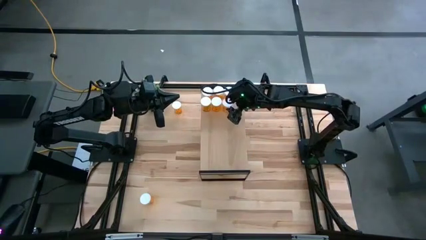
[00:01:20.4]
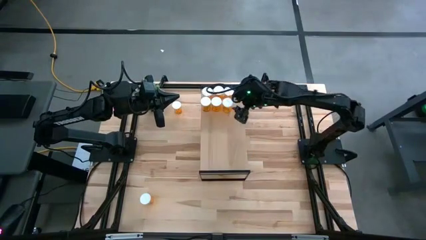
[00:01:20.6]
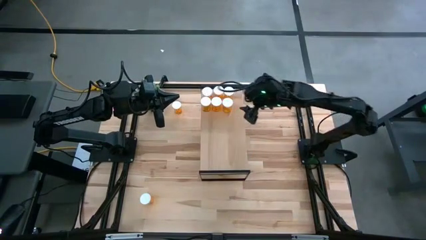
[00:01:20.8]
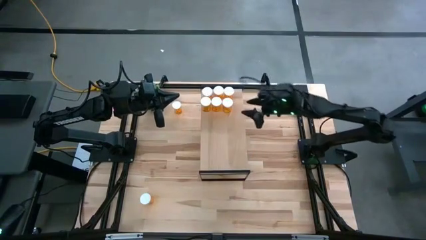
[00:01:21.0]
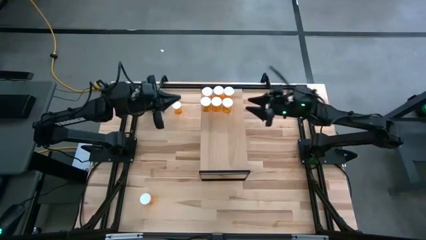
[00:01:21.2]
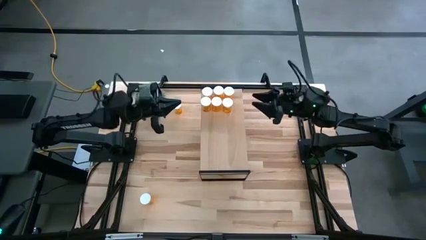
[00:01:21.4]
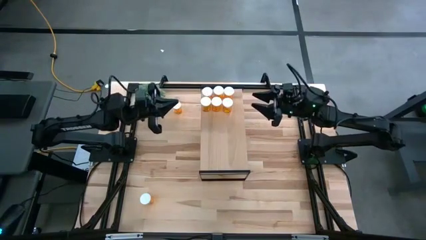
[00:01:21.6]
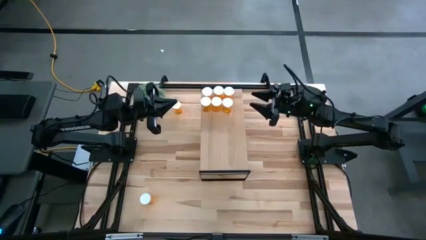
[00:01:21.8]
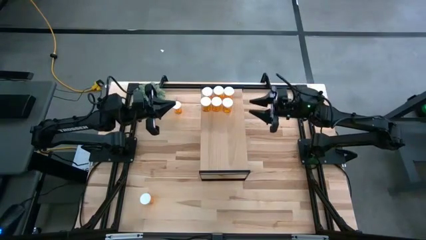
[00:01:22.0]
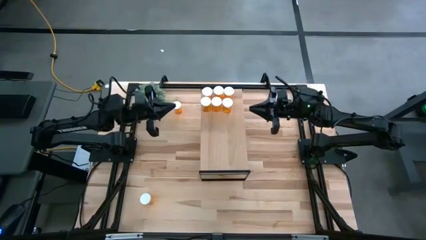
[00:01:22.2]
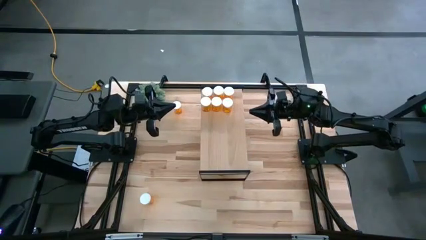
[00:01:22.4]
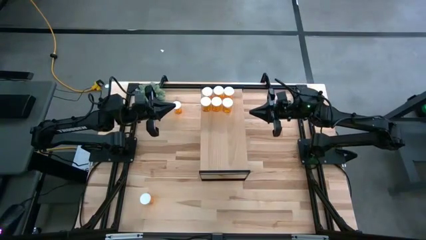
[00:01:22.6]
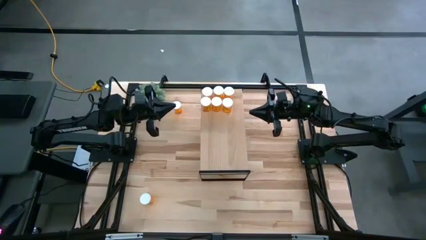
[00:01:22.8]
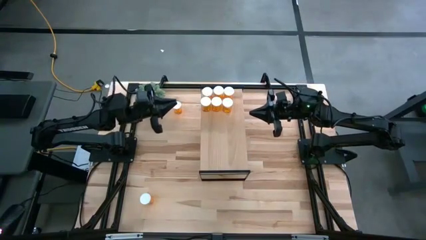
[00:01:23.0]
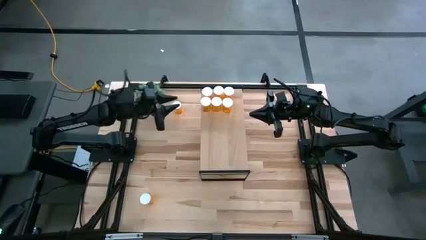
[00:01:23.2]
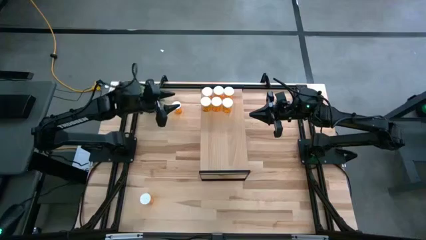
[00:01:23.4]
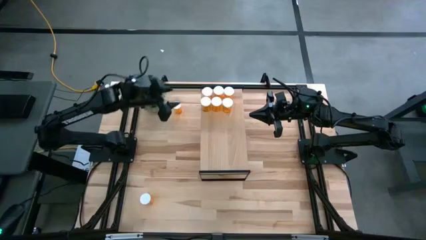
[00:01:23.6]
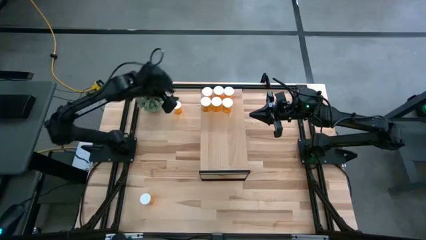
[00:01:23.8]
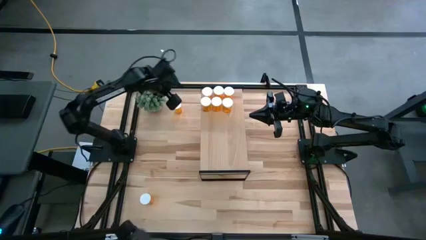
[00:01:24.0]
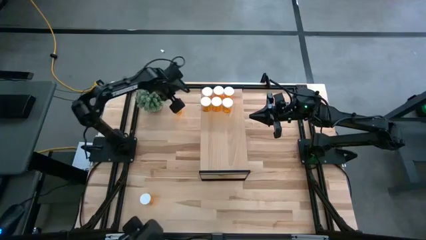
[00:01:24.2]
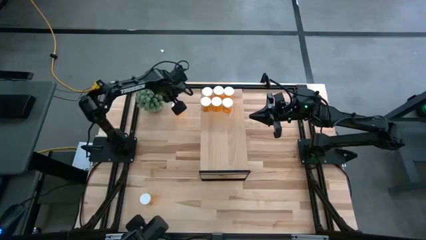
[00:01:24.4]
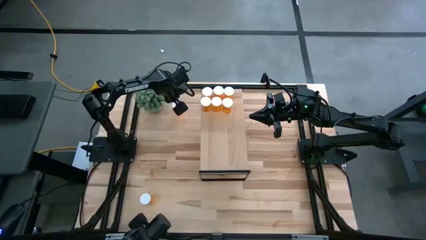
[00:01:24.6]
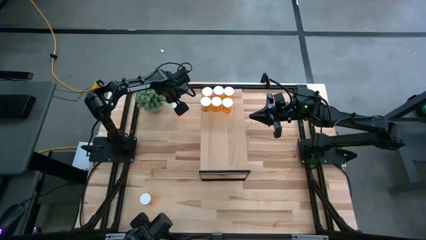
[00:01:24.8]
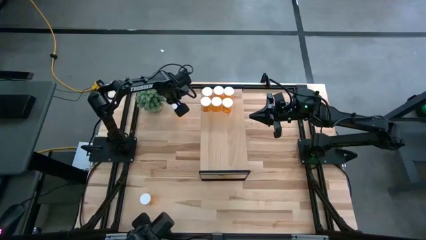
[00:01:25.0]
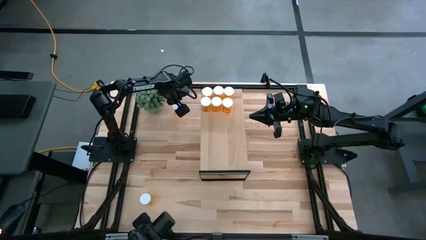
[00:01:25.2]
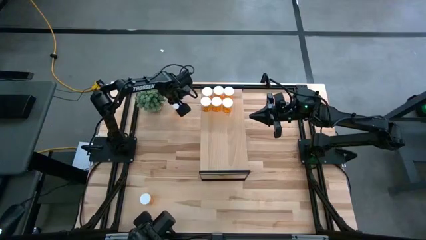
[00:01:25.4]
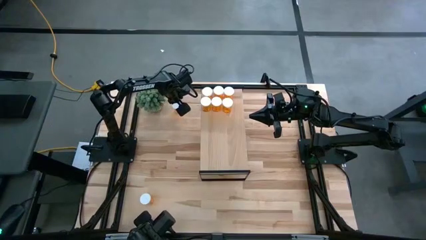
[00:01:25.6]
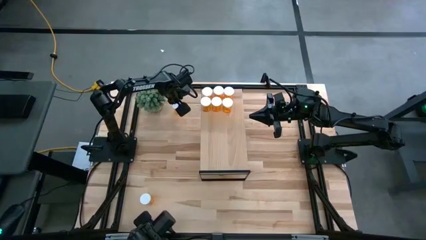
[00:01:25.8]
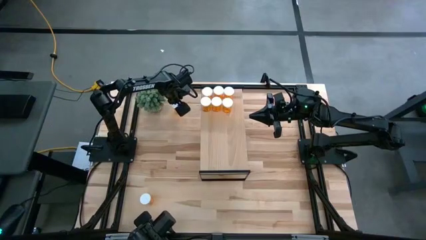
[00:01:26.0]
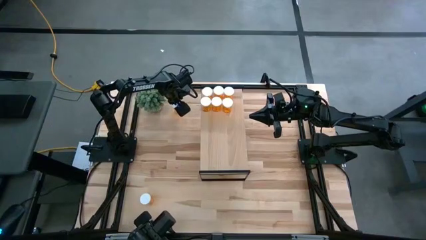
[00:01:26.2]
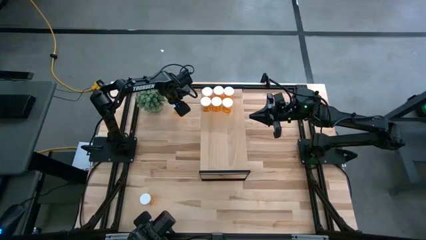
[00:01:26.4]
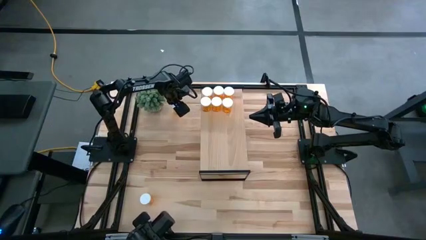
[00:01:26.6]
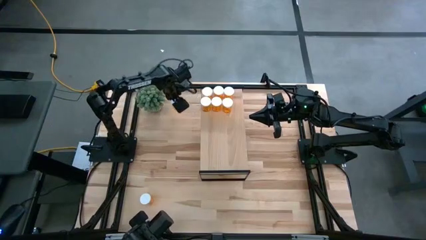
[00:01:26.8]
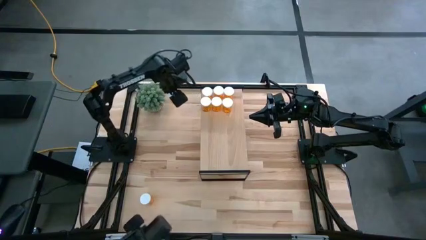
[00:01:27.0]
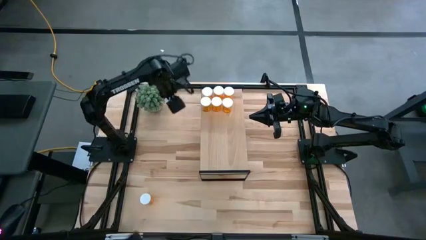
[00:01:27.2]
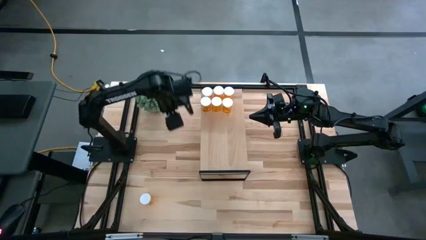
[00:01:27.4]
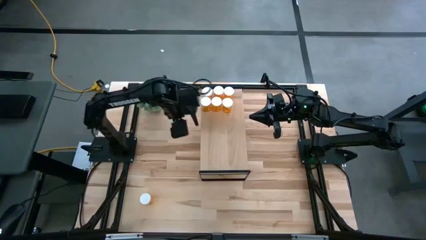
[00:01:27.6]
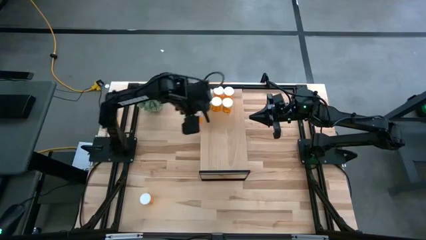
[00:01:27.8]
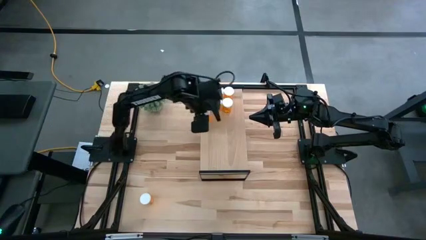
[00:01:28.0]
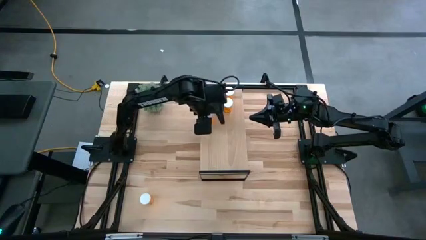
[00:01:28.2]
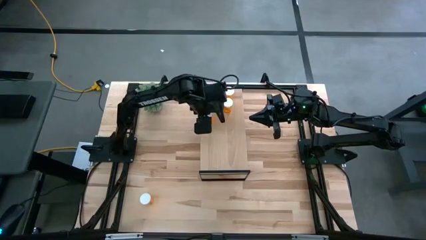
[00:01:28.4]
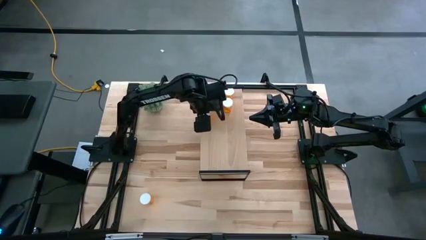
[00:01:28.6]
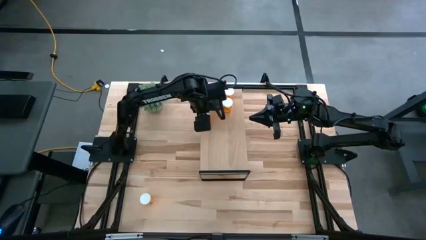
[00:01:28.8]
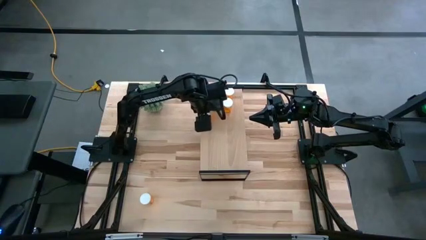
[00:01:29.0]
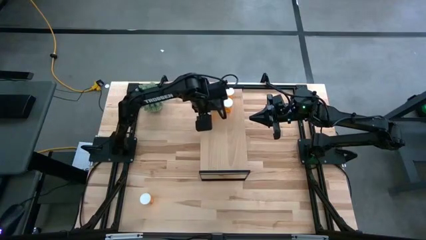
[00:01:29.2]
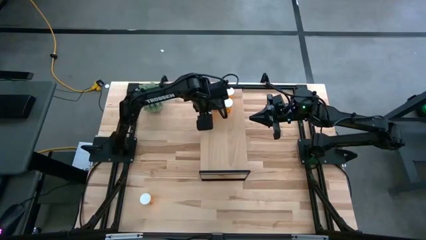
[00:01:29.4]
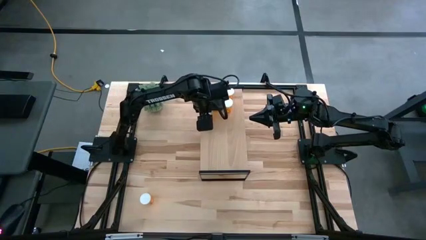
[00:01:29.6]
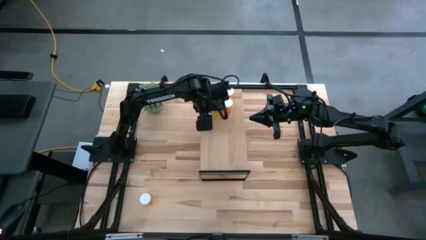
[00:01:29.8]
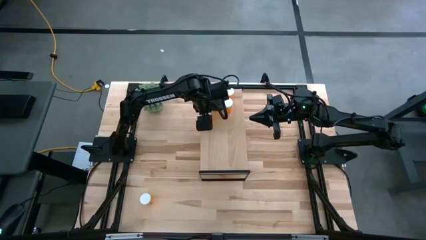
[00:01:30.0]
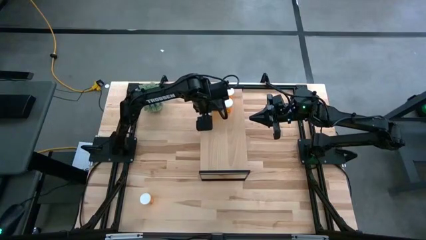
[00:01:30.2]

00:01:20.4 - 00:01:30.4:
Task: Pick and place medicine bottles onto shelf by color
Put the orange pill bottle on the shelf

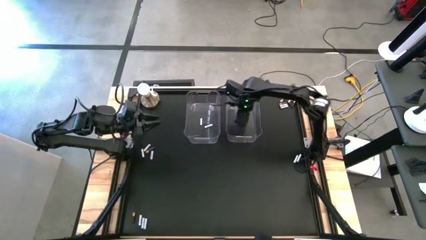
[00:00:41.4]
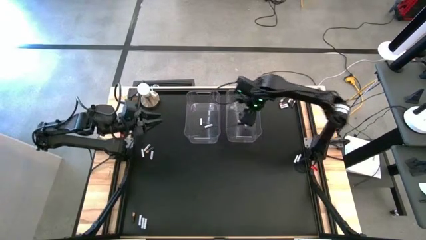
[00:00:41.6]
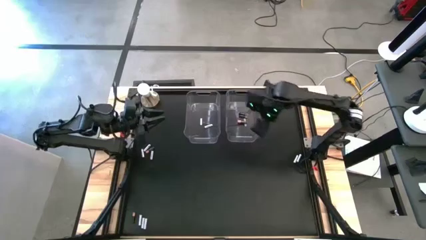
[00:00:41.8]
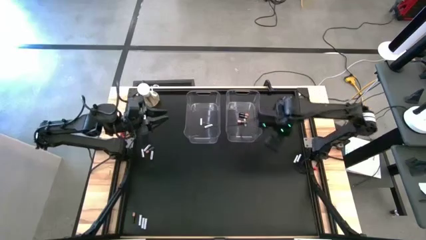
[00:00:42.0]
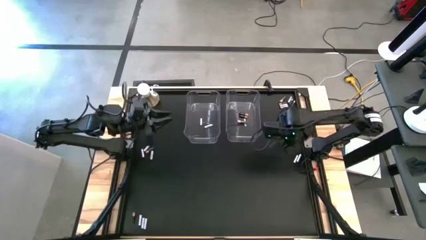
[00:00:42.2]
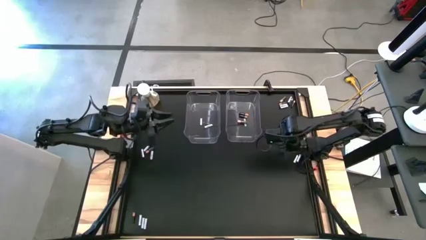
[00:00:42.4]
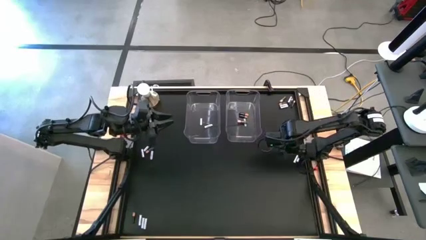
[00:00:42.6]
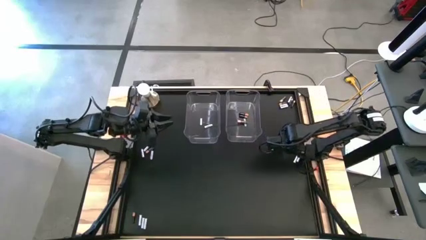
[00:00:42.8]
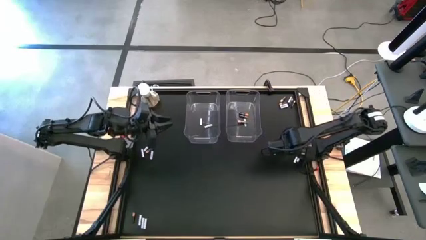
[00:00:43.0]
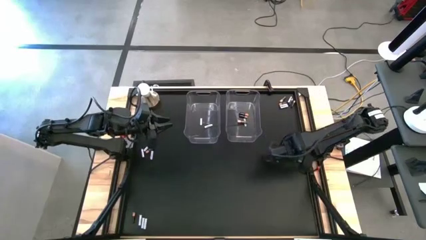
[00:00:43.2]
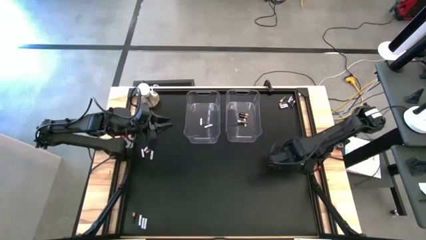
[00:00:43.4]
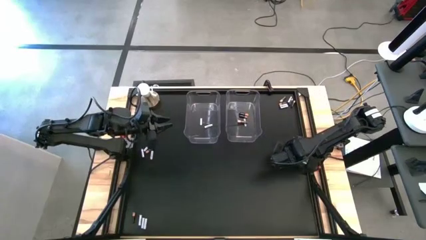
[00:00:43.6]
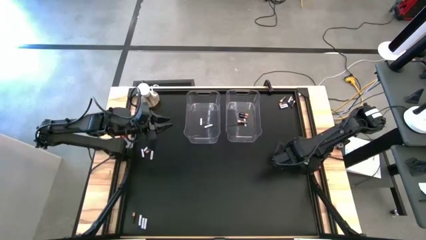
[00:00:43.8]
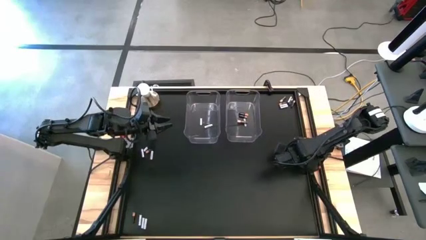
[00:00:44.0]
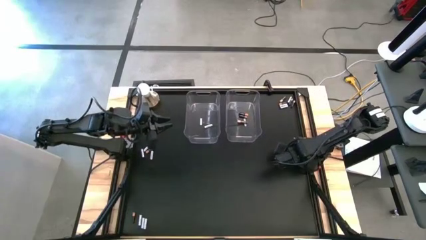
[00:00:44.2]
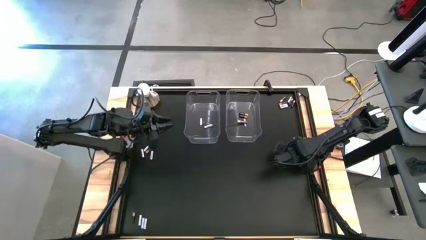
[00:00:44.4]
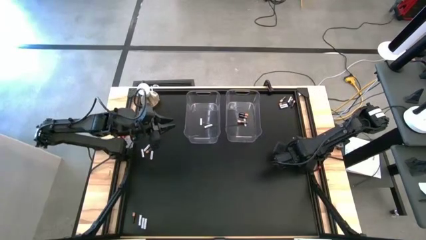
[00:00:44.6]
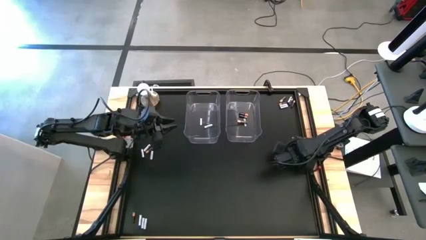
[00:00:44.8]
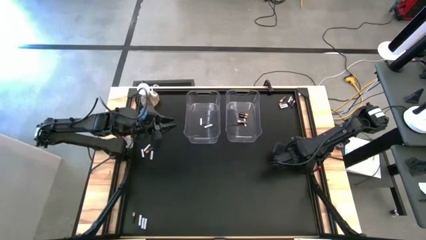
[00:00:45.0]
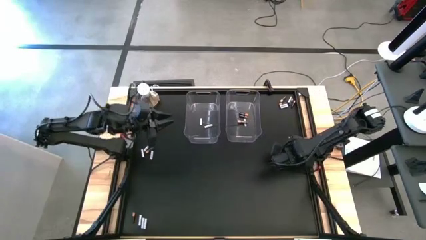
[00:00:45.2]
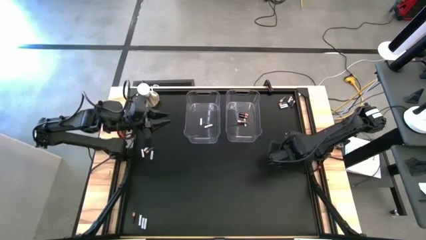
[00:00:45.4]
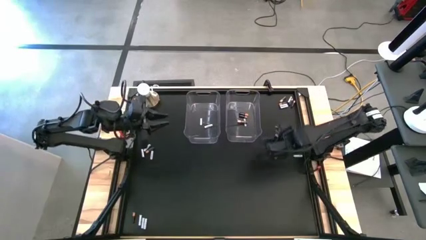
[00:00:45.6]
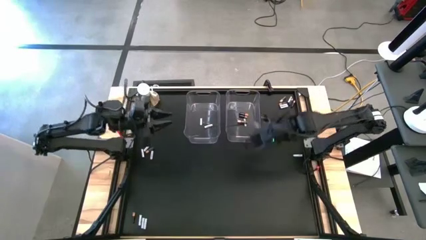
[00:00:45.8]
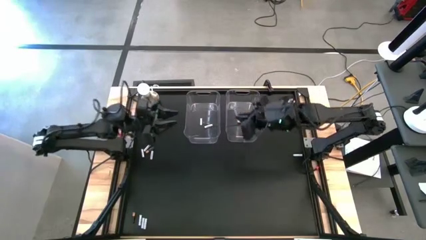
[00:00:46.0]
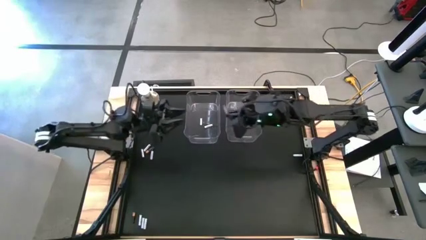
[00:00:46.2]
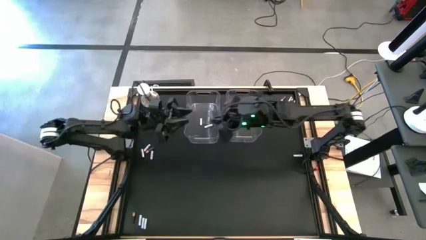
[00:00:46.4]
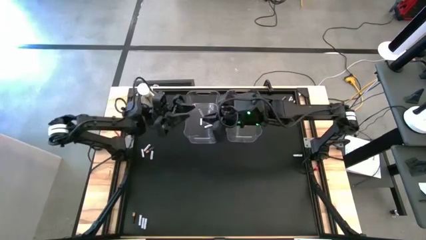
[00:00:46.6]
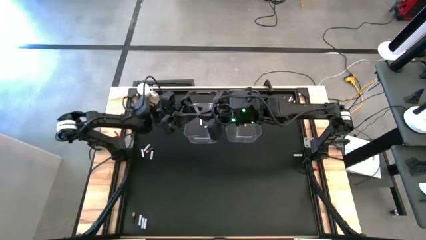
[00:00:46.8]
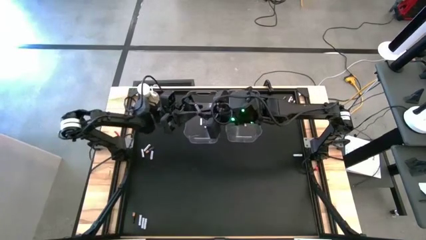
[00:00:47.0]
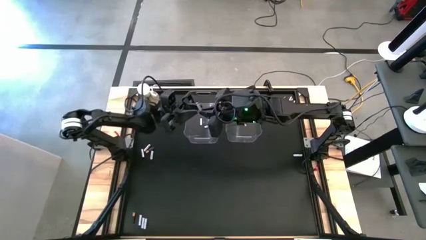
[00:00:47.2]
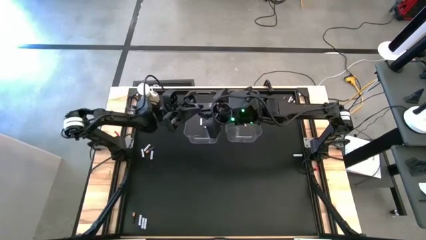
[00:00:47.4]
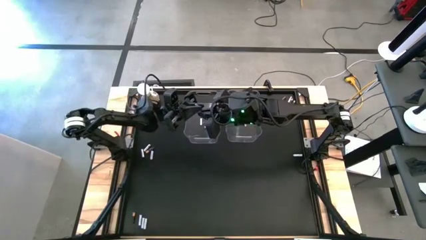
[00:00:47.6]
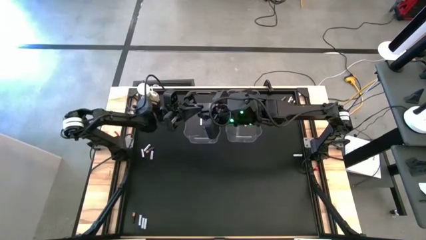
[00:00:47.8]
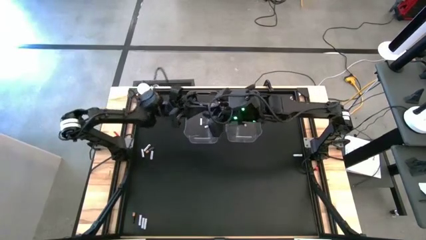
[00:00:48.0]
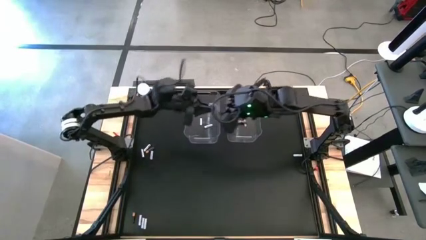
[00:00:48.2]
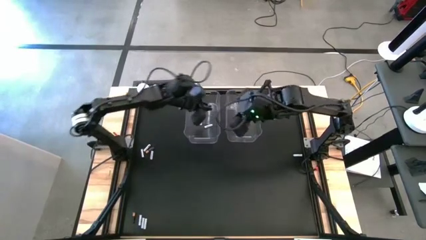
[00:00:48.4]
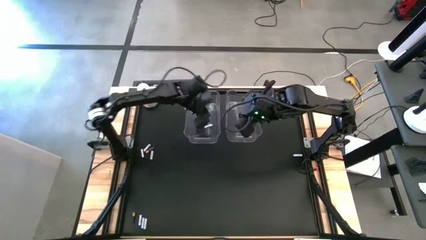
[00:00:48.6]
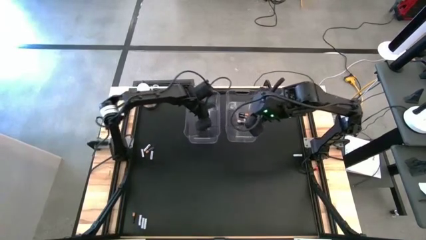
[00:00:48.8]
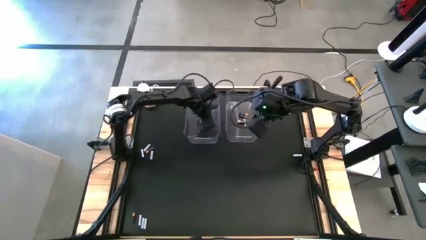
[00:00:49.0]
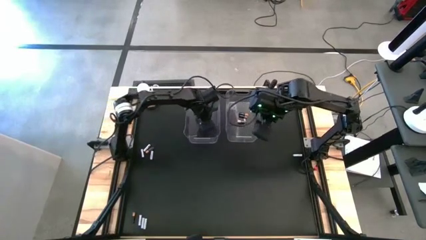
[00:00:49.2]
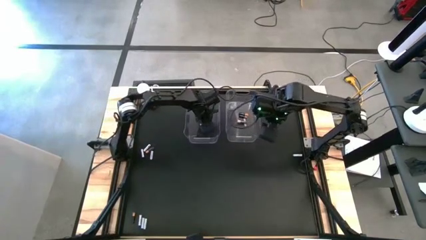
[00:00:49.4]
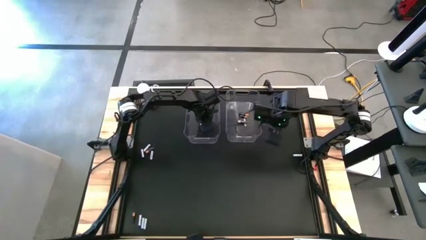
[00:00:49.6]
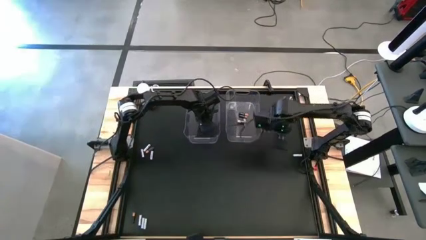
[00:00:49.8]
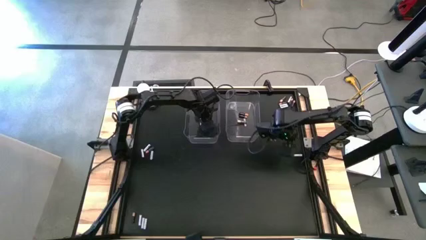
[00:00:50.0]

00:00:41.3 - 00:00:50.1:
Task: Sort batteries
Put the white battery into the left transparent bin
